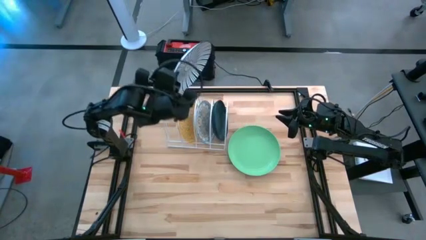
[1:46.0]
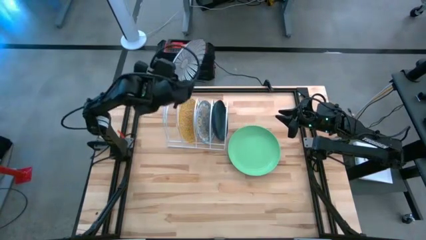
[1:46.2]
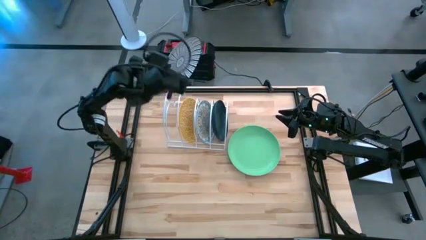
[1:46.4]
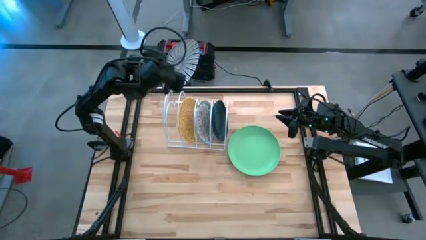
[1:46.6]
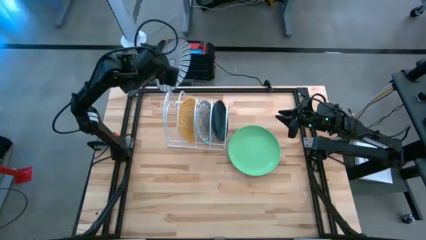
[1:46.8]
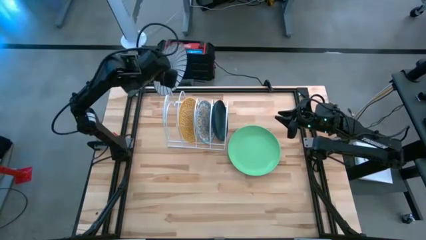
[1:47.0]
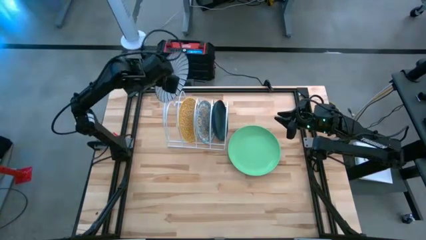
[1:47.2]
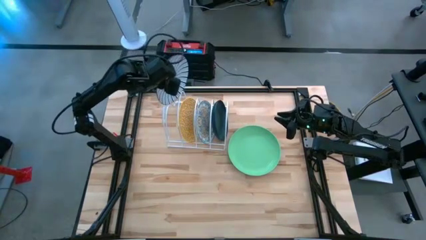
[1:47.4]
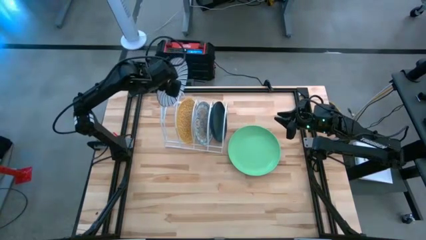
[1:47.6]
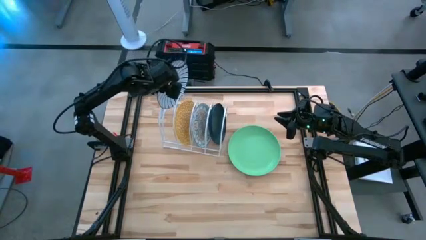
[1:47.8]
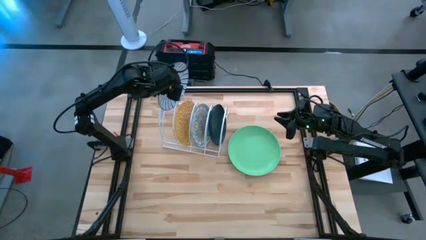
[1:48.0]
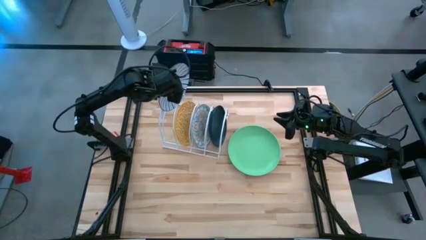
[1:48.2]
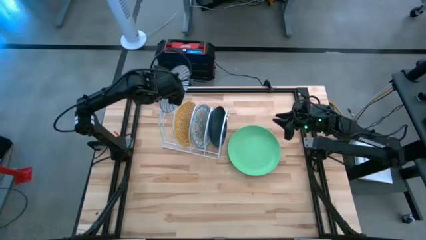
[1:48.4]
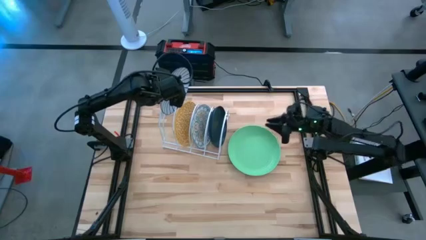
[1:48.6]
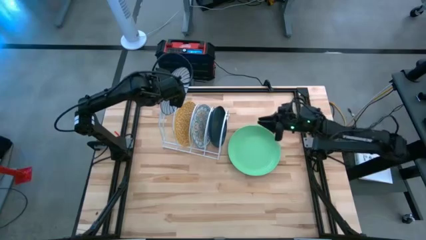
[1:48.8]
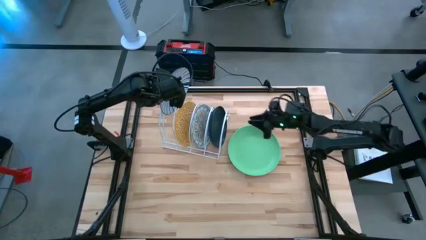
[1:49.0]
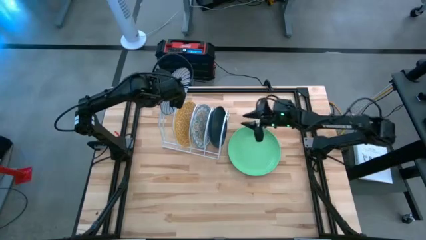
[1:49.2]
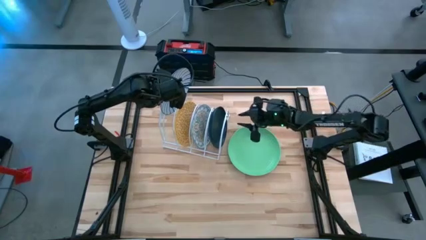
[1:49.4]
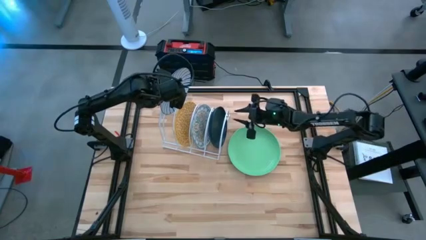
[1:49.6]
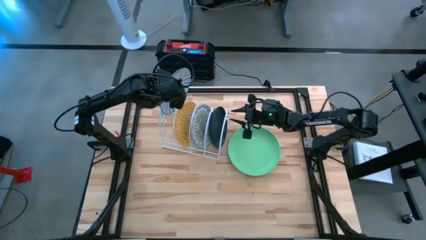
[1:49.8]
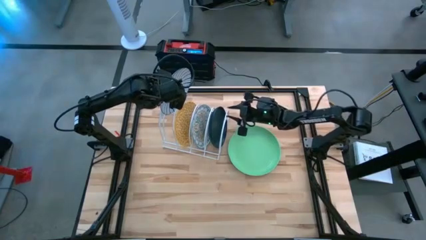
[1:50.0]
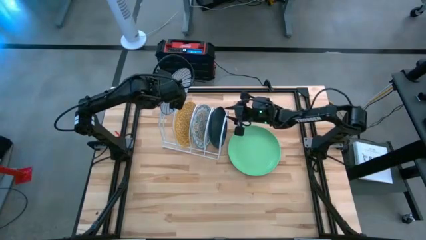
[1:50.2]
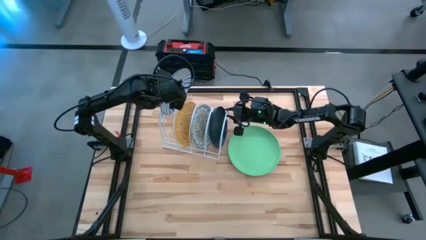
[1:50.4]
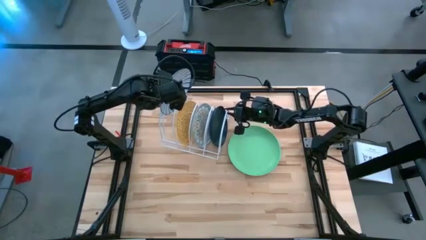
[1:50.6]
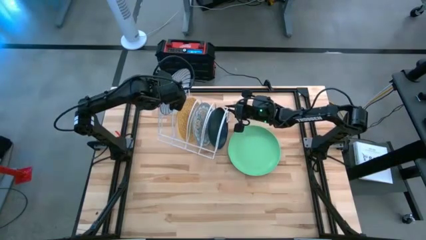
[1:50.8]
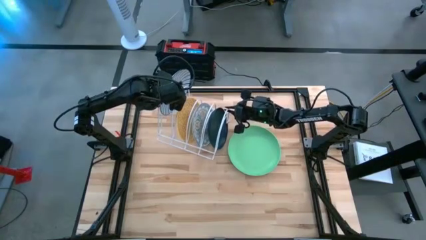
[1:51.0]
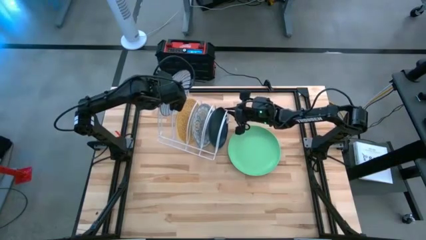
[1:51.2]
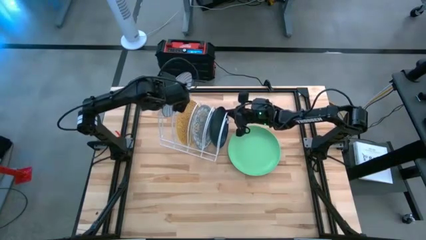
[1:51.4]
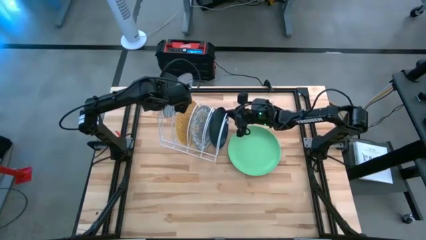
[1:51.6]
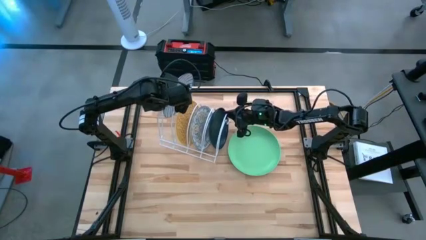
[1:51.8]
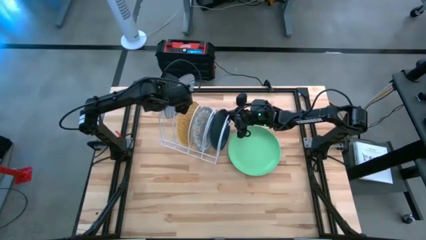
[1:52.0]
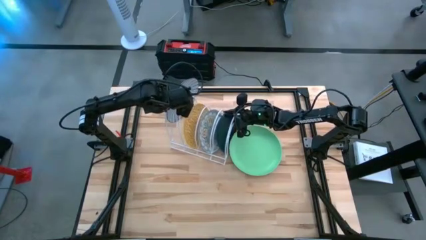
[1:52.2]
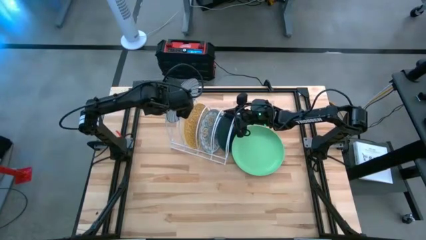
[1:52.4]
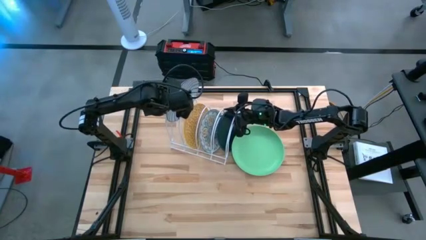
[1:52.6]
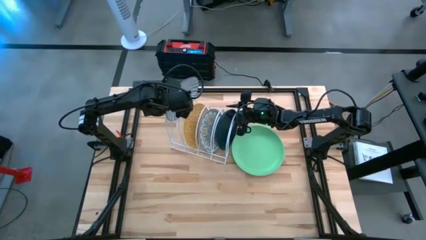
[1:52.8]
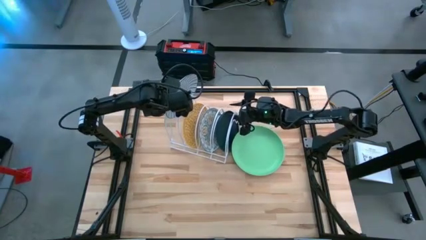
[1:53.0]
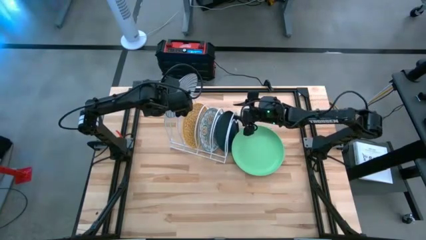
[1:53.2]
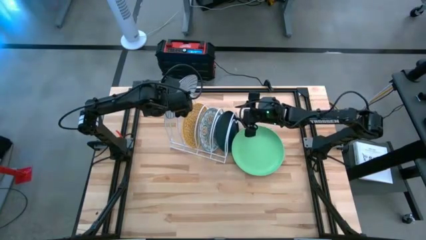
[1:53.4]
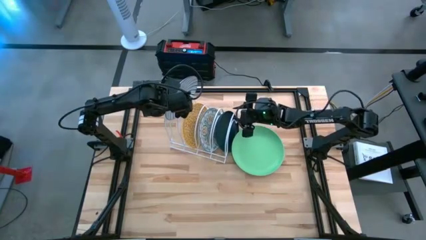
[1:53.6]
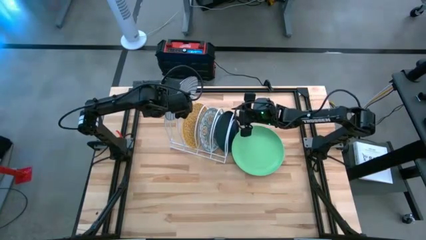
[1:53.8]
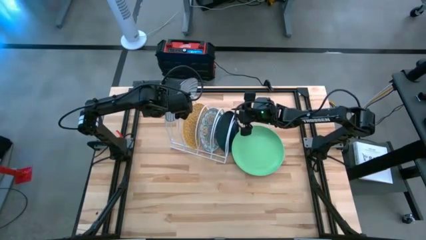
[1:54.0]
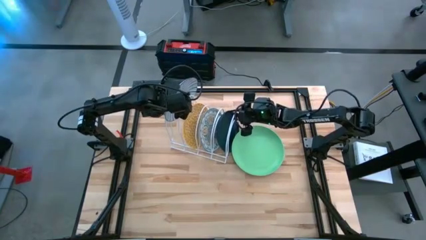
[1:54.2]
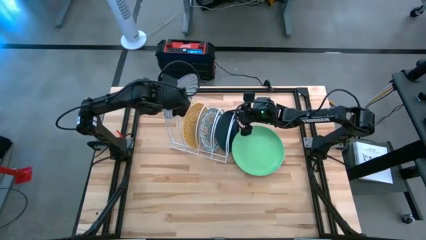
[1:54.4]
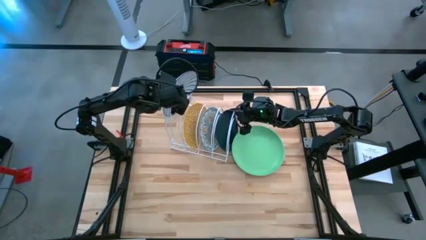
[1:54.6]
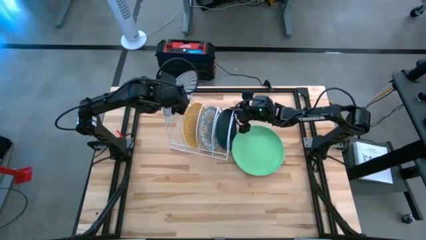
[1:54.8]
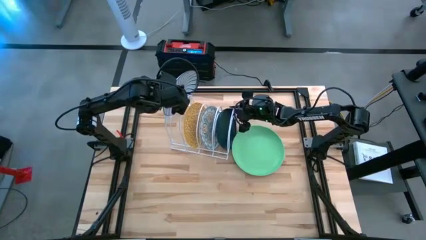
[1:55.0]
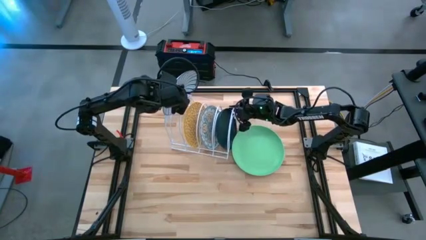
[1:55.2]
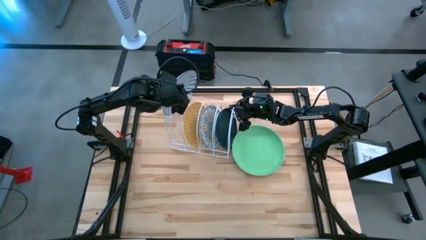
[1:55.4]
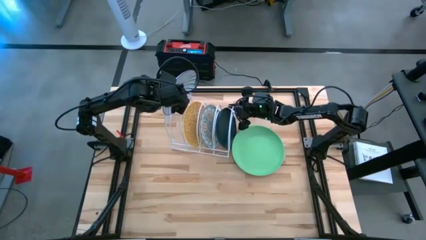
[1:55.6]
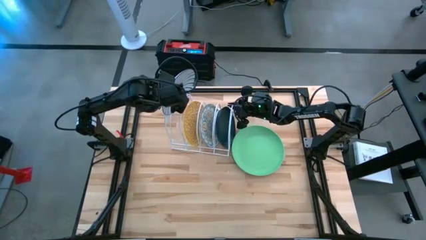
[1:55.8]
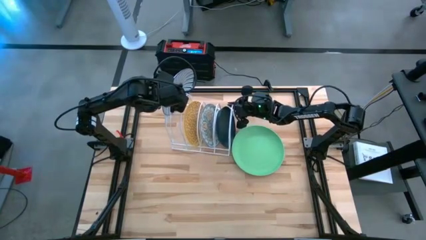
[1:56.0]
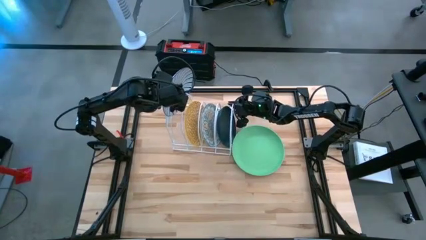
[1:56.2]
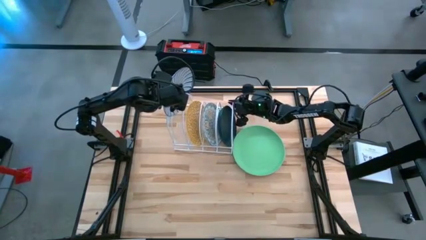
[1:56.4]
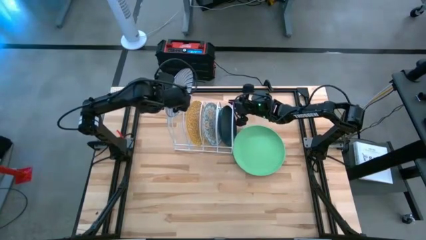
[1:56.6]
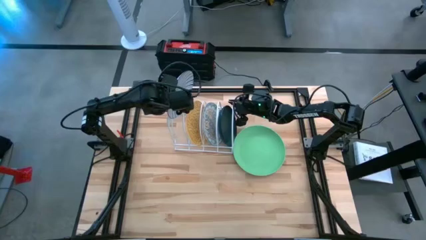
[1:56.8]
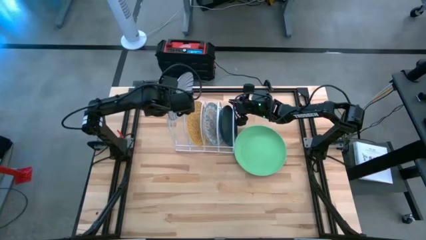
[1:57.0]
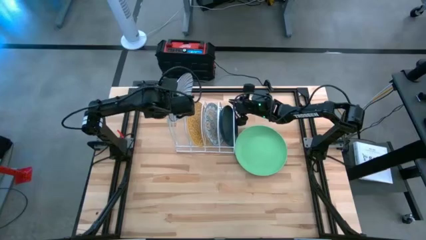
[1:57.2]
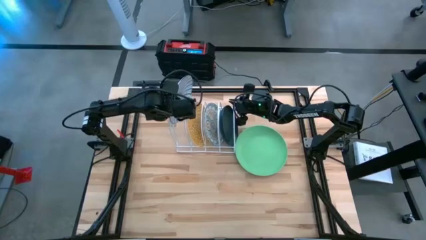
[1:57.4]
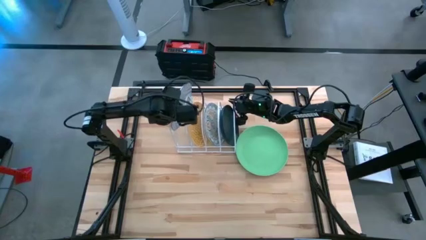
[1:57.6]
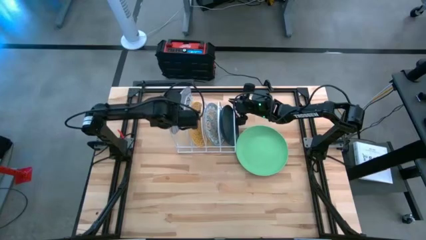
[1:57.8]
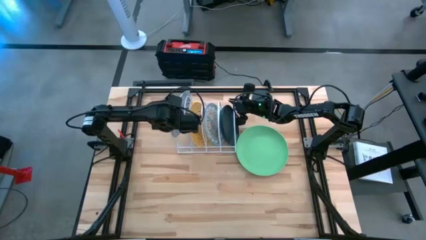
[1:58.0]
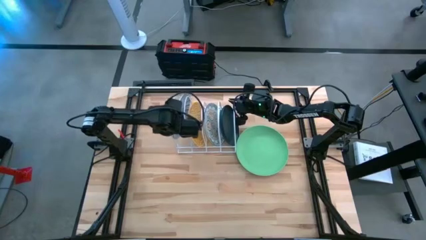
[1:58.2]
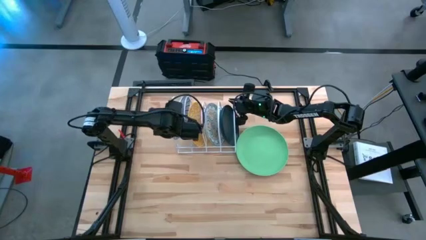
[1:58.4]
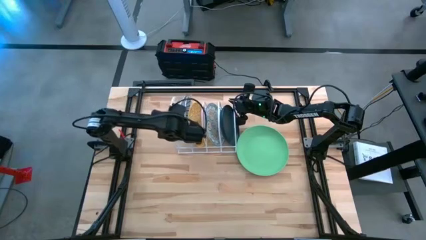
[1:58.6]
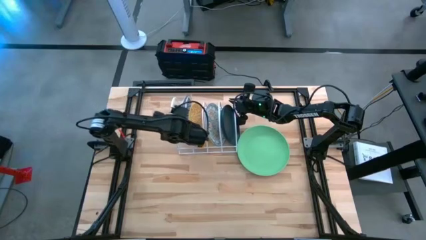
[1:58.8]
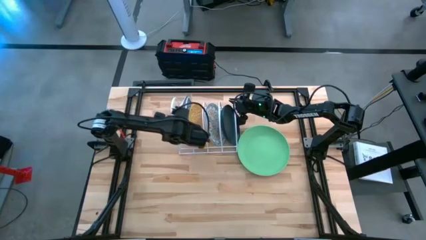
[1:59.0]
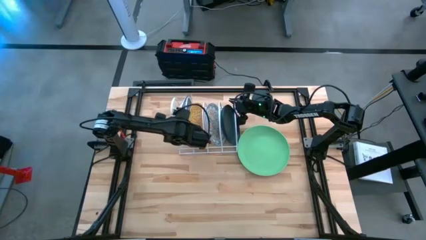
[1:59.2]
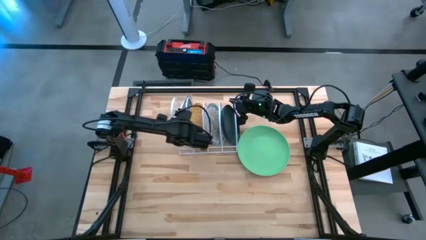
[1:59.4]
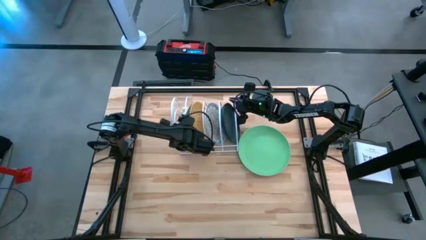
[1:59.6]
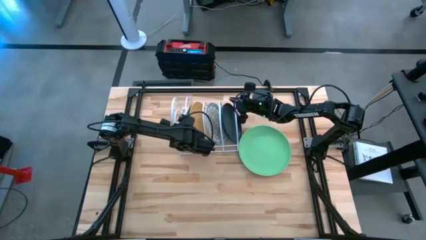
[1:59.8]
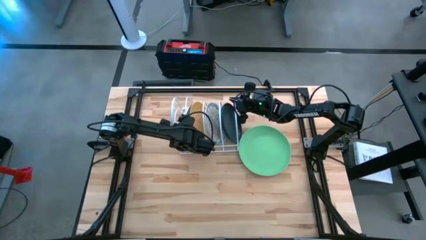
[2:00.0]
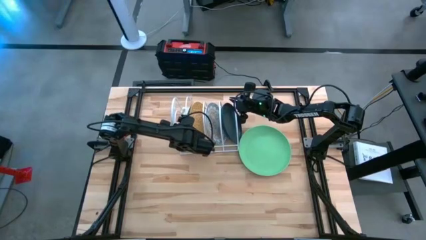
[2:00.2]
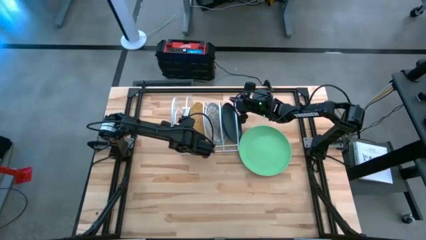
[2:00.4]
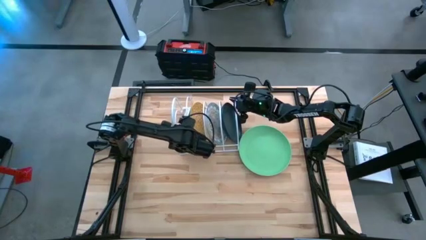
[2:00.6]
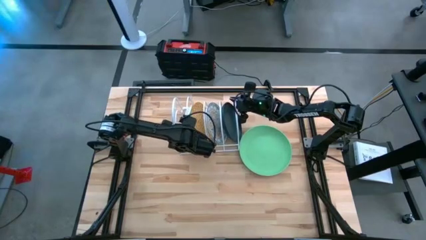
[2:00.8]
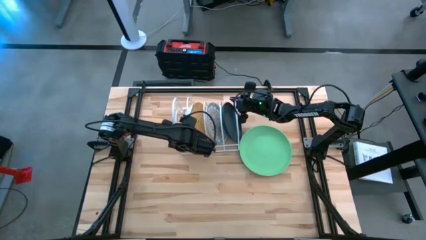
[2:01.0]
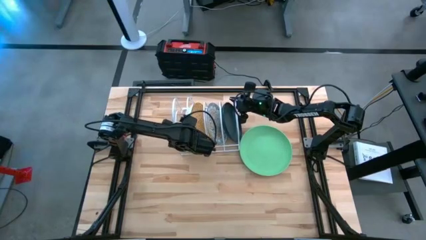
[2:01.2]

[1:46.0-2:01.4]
Task: Sort dishes
Put the blue plate in the dish rack
